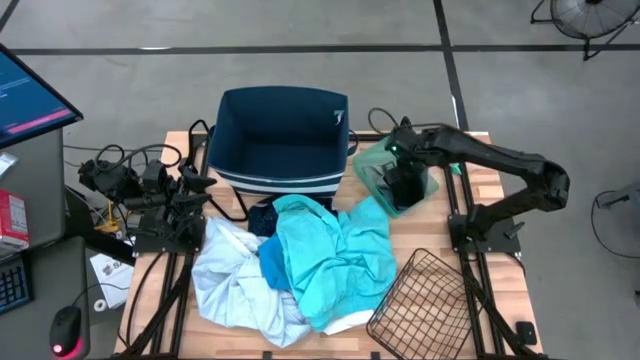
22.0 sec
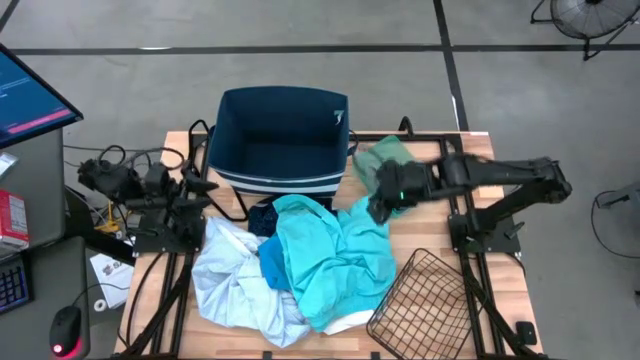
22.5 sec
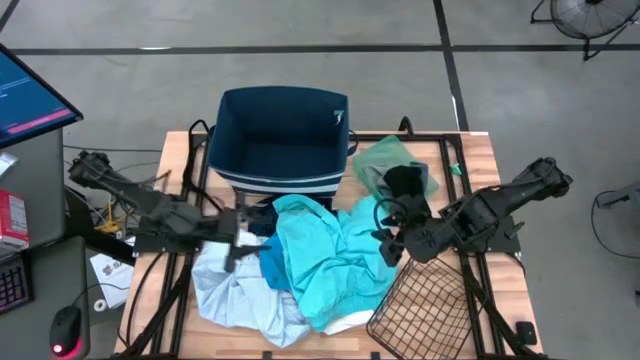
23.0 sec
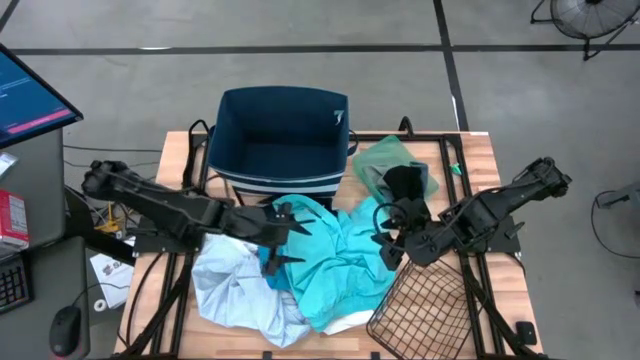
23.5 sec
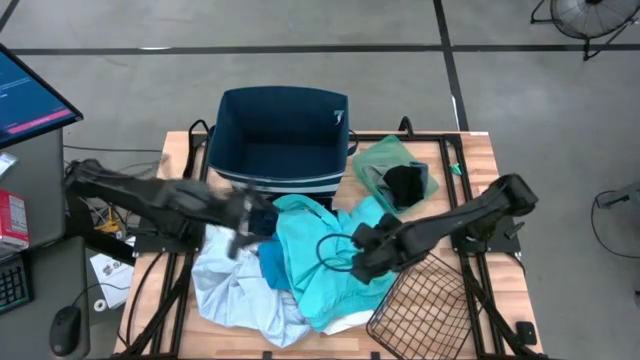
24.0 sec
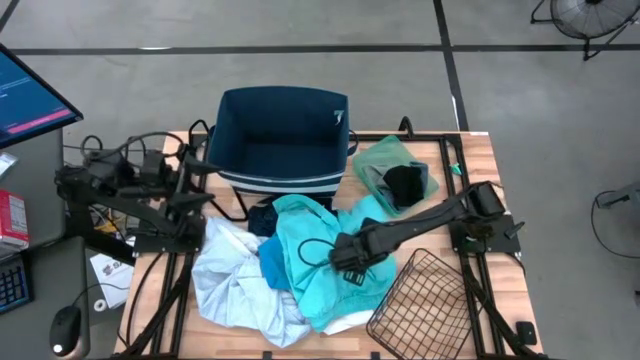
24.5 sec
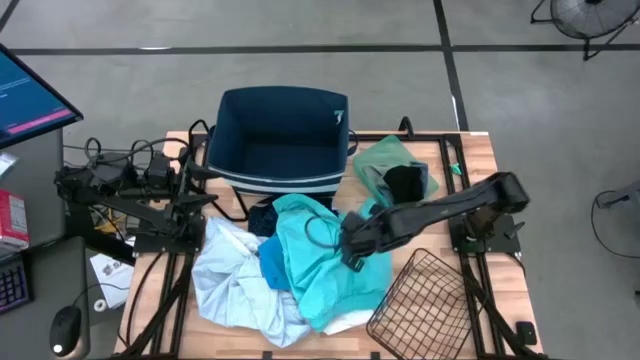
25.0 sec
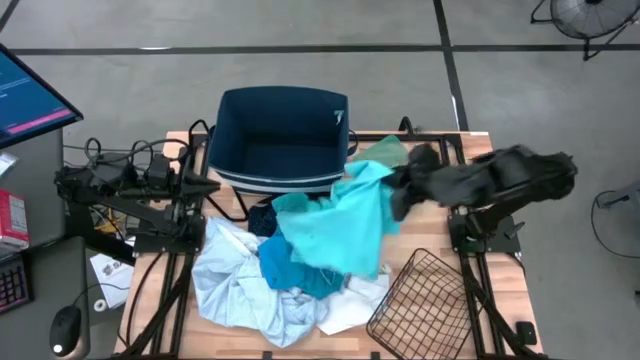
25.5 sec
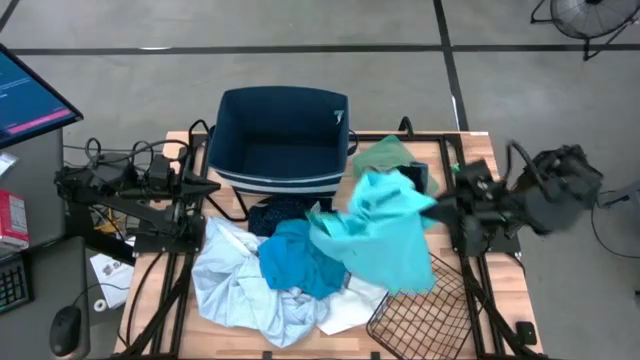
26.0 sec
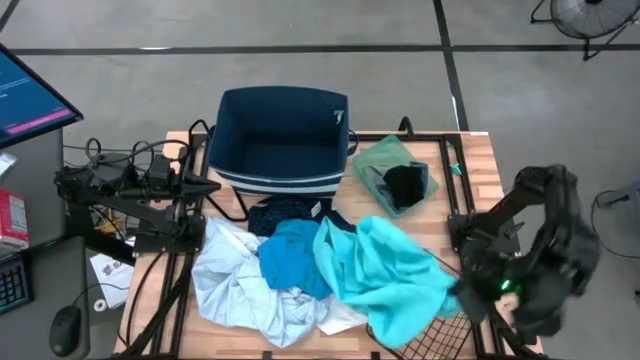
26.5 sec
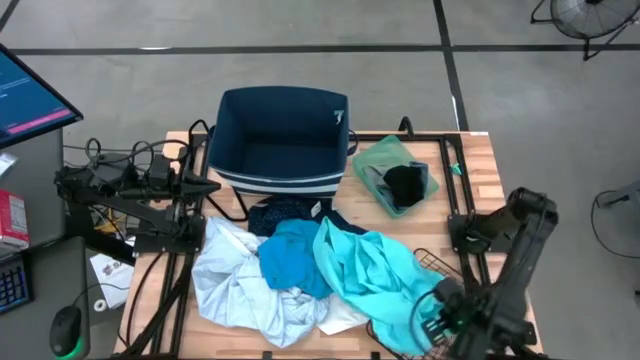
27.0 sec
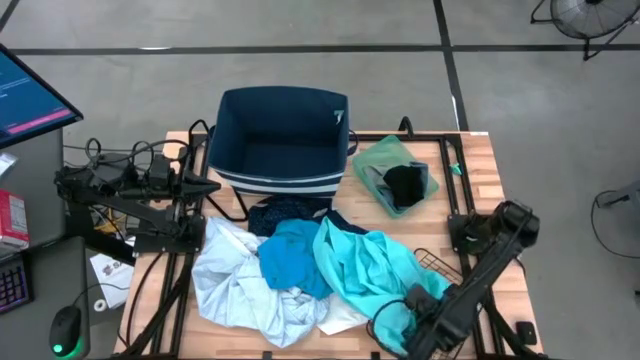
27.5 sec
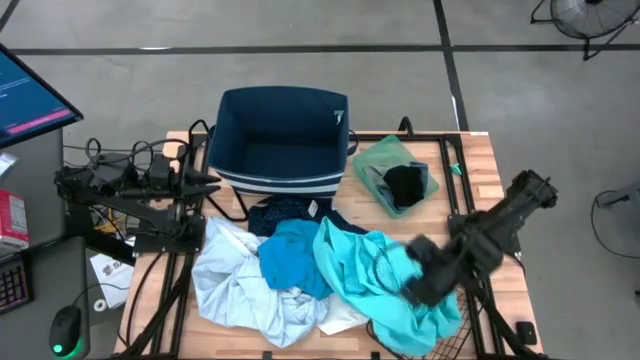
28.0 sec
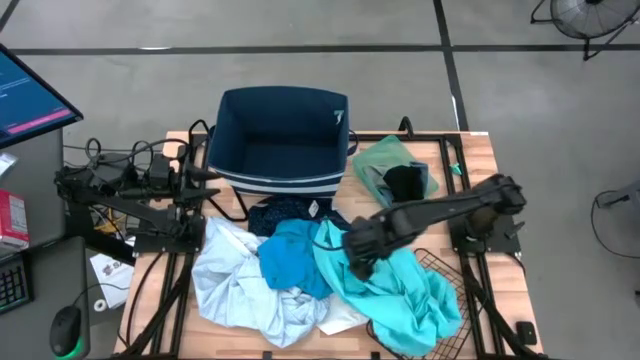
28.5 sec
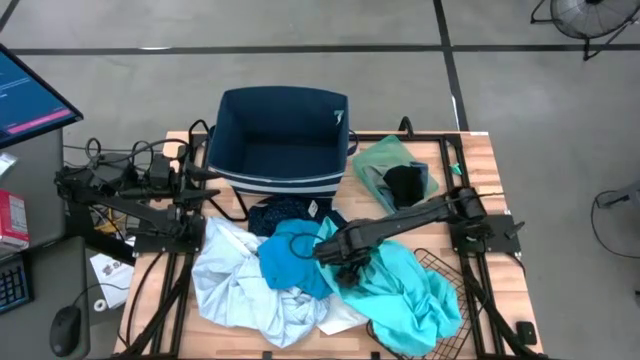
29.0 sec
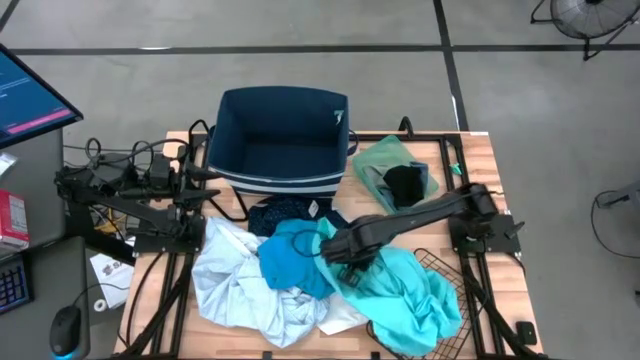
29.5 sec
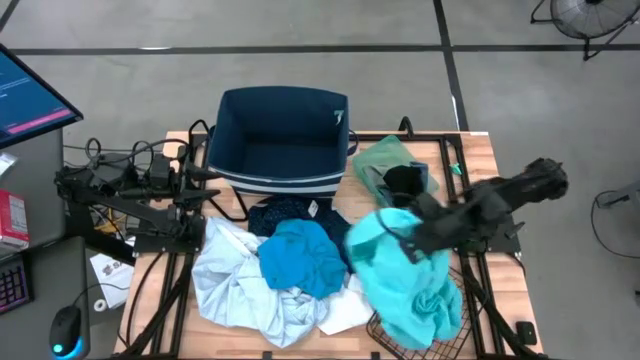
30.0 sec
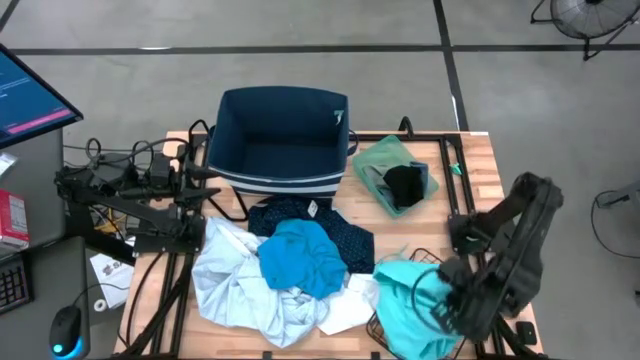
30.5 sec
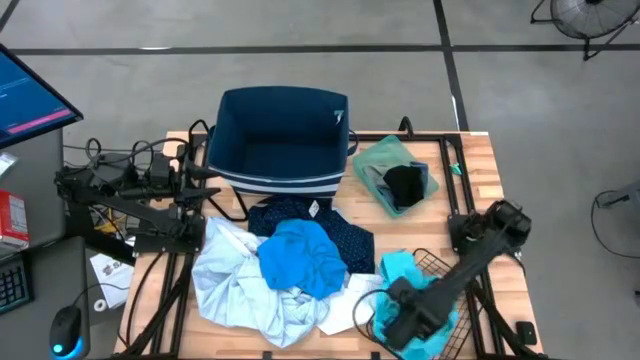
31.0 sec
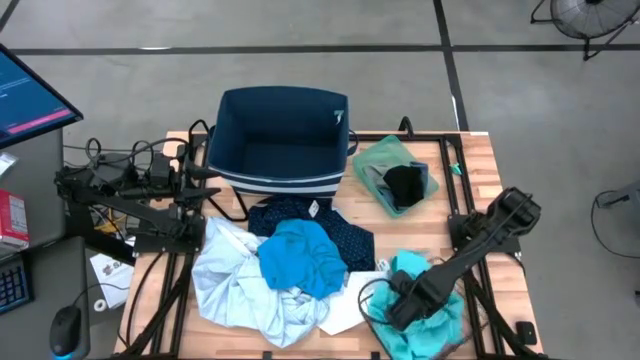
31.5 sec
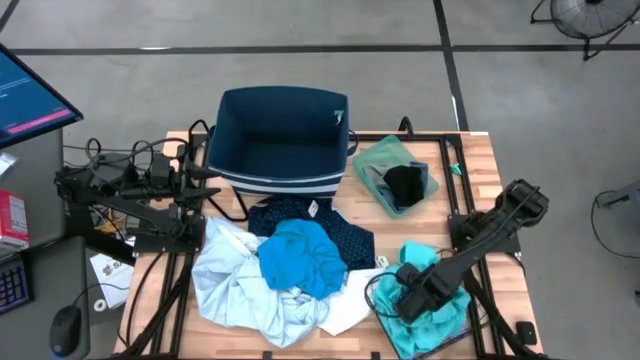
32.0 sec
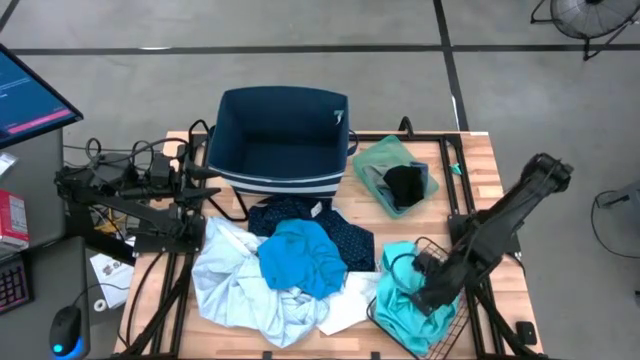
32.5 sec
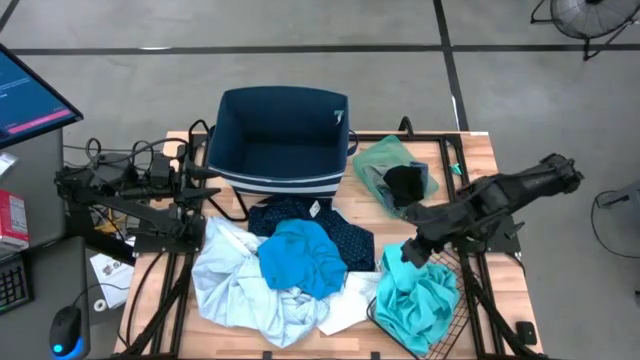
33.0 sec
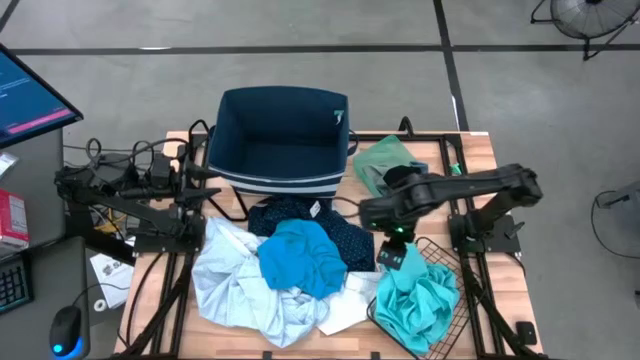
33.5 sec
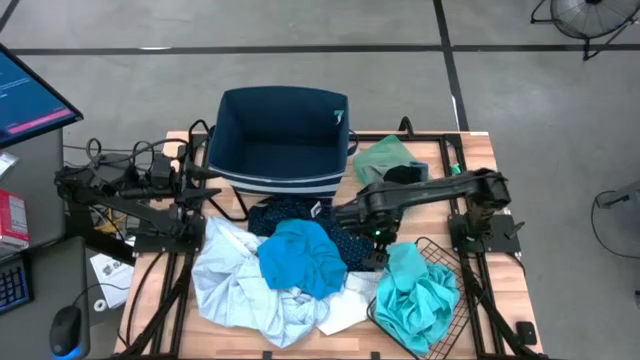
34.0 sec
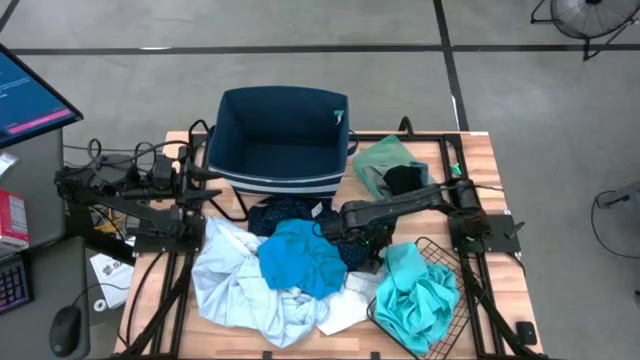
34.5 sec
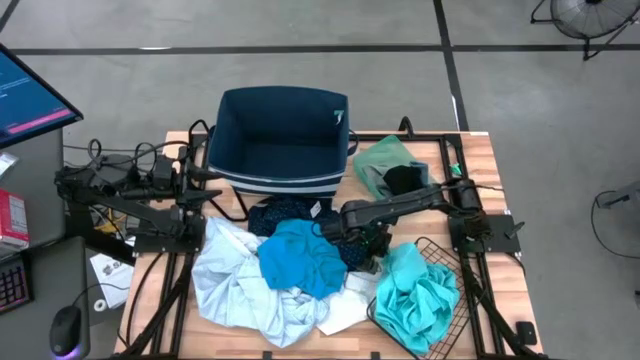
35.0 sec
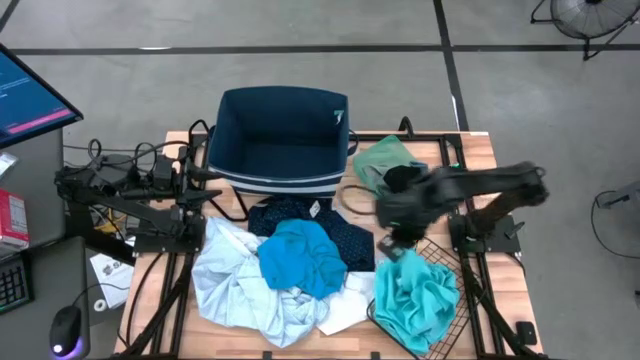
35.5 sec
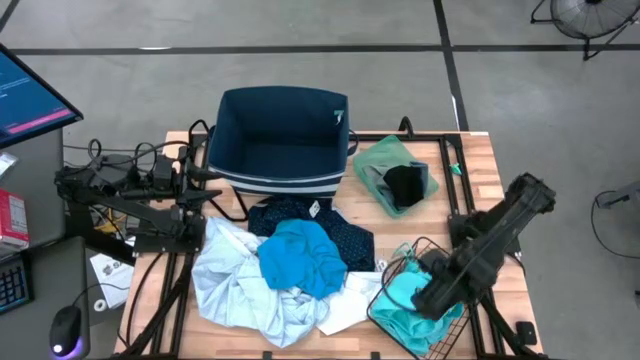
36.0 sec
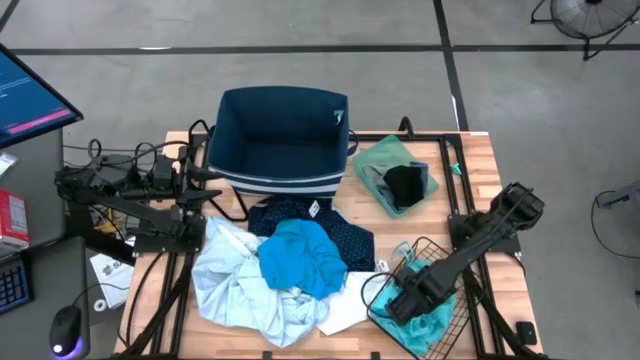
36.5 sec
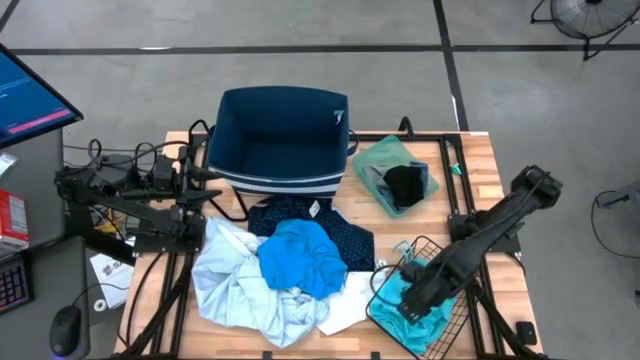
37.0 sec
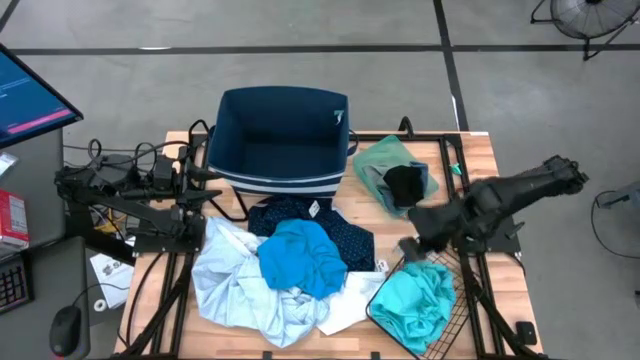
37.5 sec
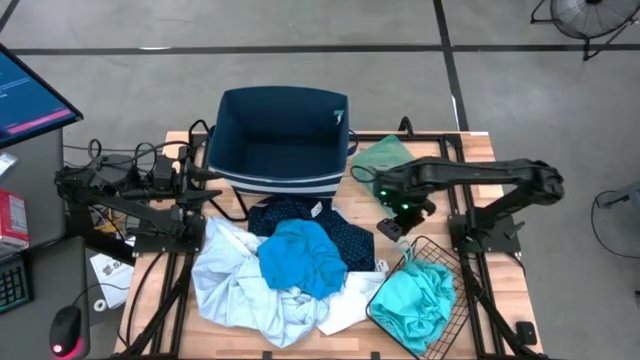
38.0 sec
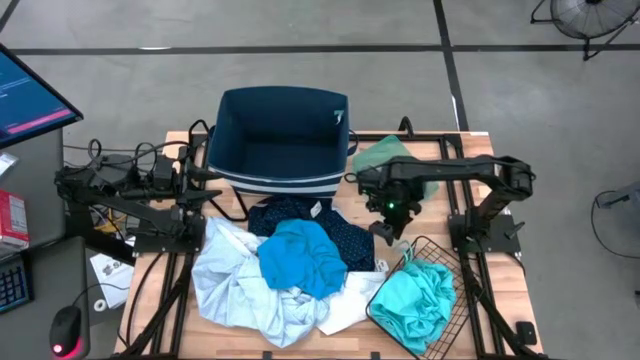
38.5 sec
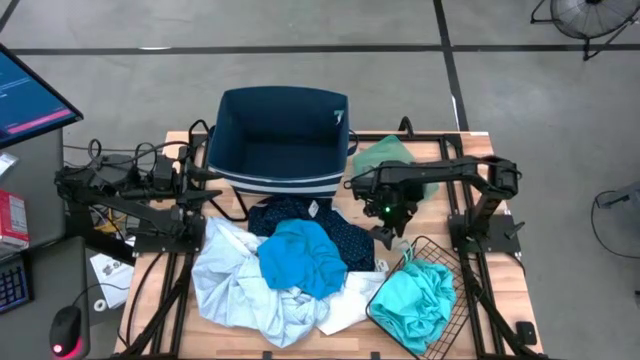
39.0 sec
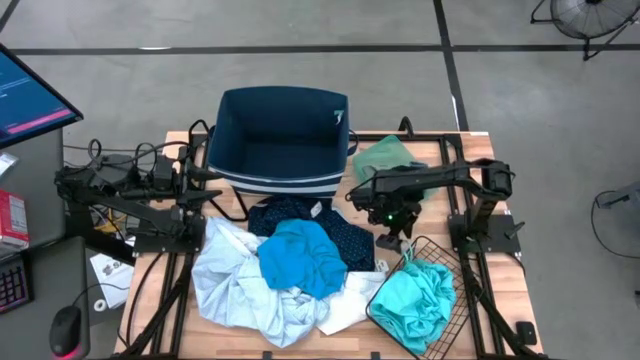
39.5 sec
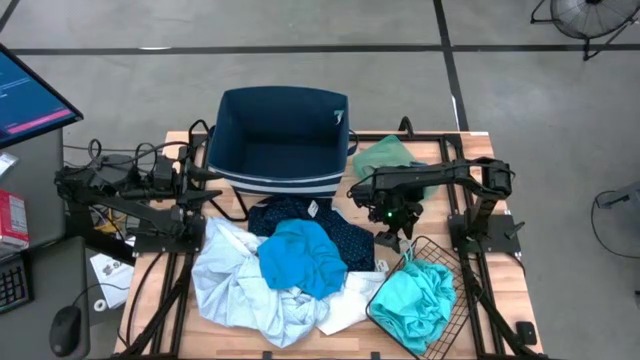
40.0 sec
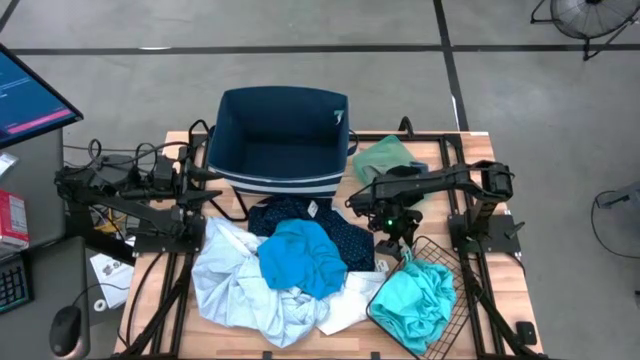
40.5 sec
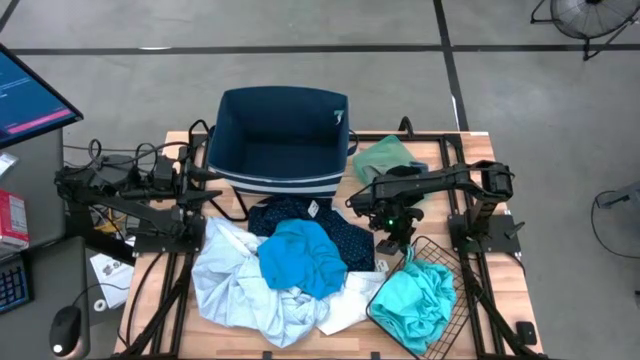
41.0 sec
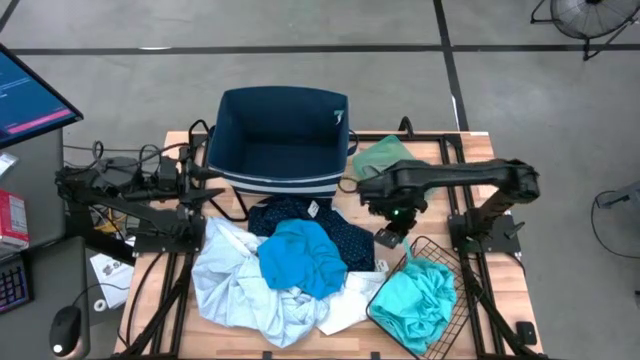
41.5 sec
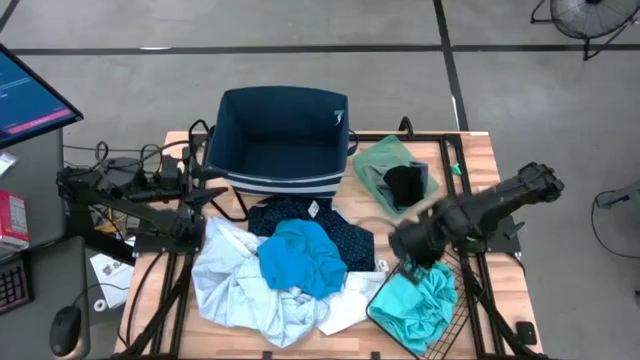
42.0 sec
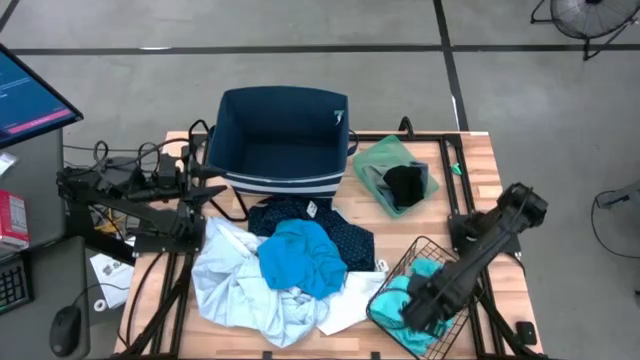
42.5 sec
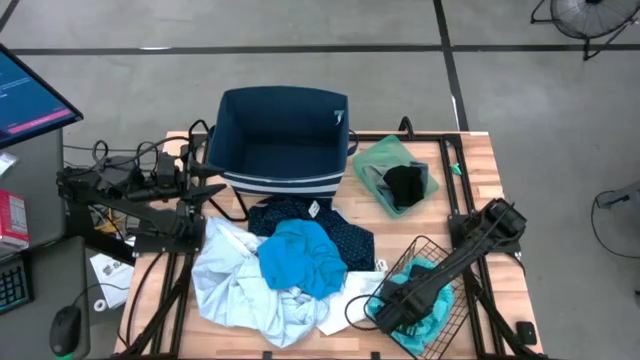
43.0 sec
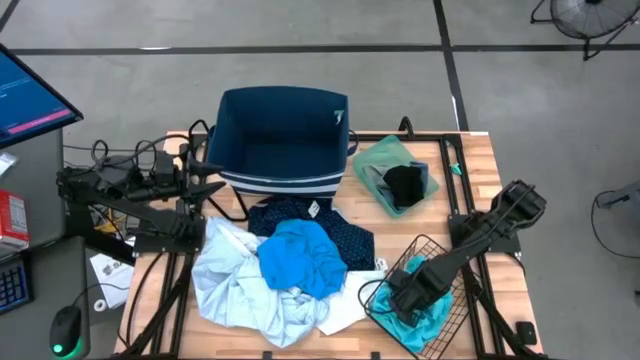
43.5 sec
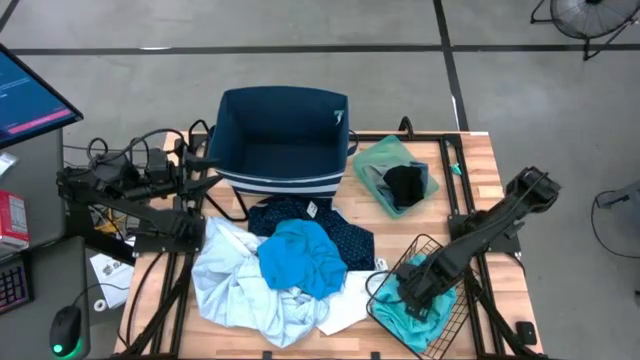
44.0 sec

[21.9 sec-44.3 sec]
Task: Pick & Place Cloths
Put the light blue shorts into the black wire basket

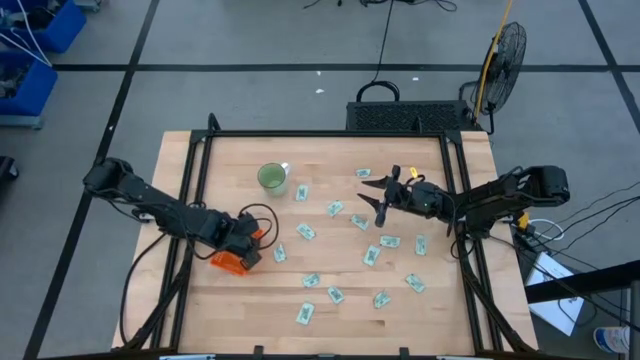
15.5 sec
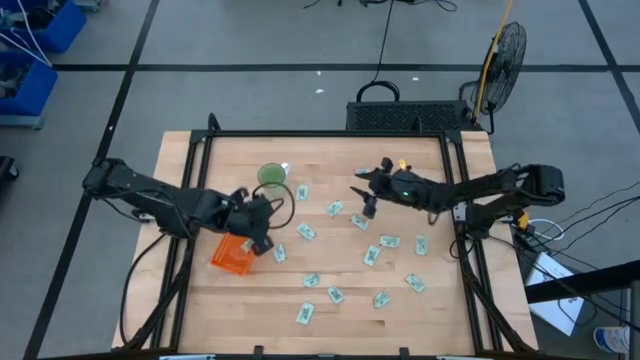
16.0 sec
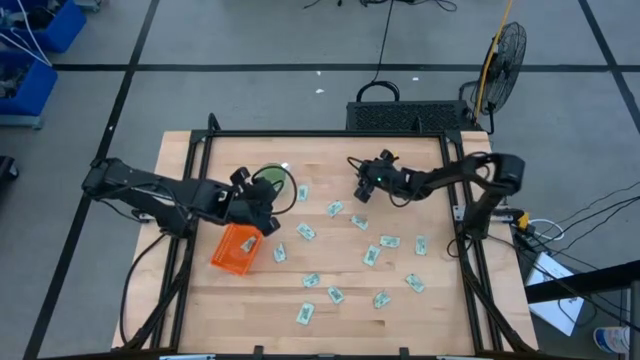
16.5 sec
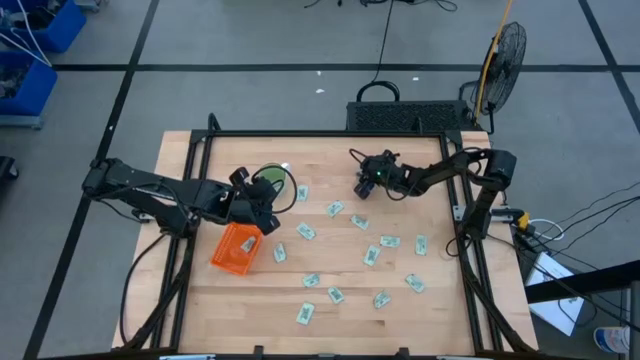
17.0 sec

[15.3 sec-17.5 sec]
Task: Pick and place Stevia / Truvia into bins
Put the stevia packet into the orange bin
